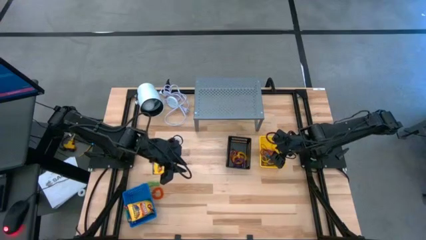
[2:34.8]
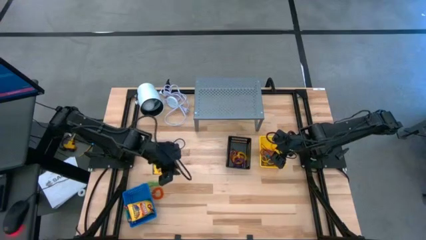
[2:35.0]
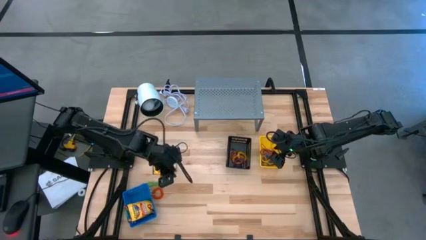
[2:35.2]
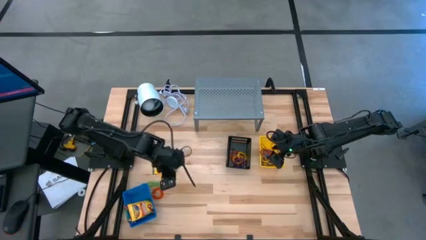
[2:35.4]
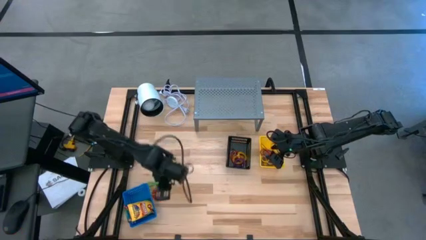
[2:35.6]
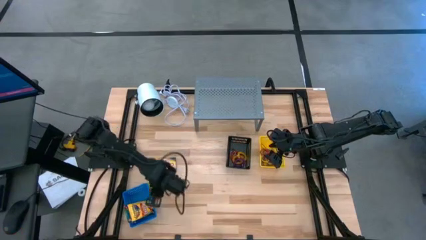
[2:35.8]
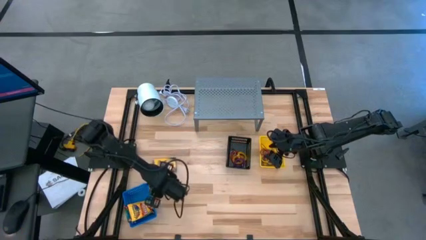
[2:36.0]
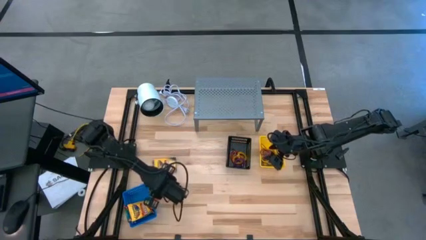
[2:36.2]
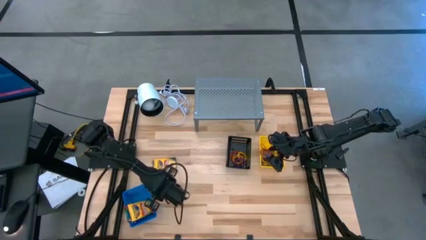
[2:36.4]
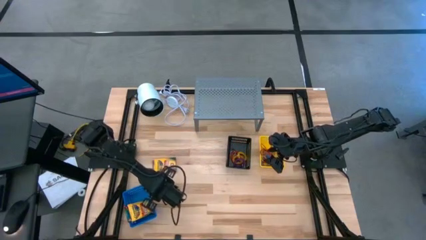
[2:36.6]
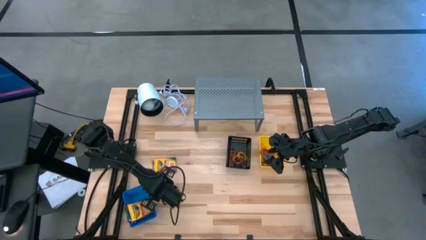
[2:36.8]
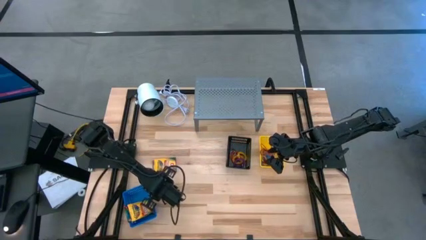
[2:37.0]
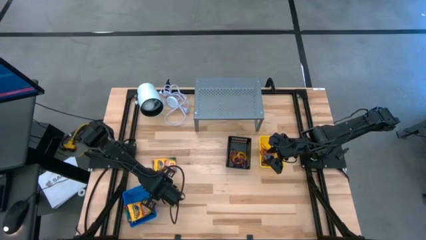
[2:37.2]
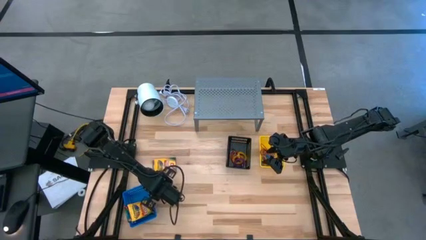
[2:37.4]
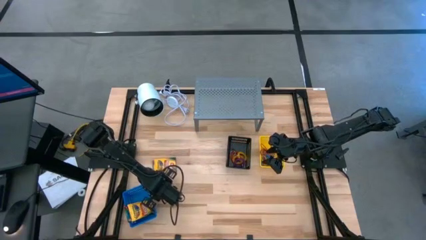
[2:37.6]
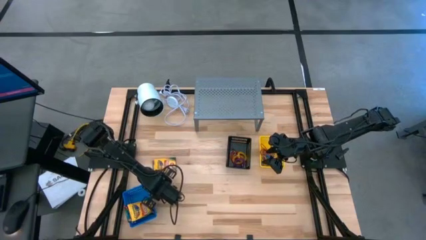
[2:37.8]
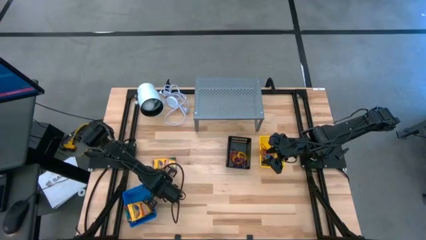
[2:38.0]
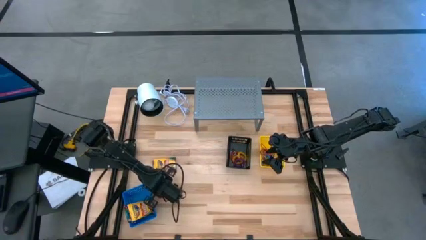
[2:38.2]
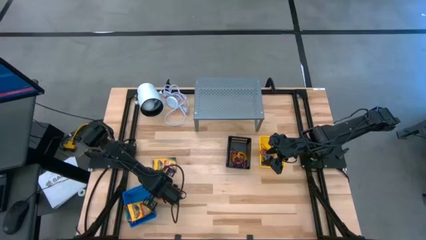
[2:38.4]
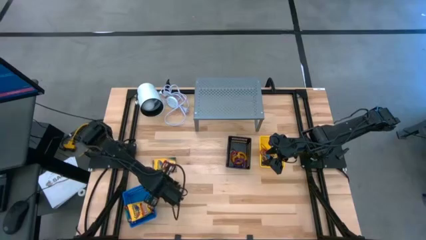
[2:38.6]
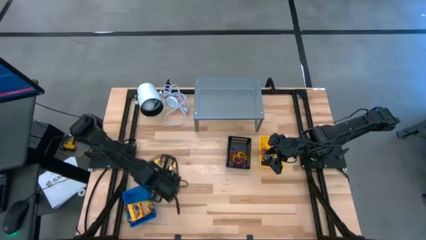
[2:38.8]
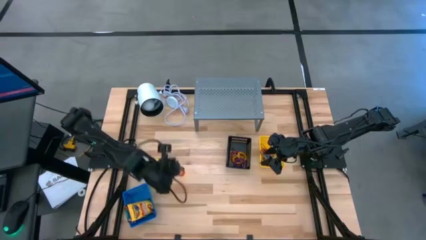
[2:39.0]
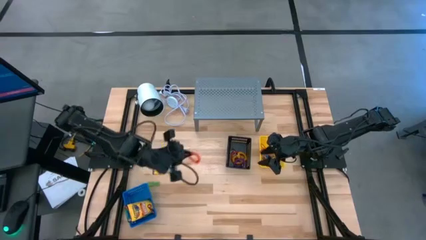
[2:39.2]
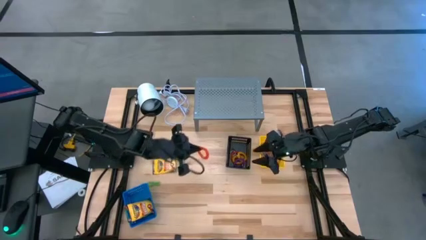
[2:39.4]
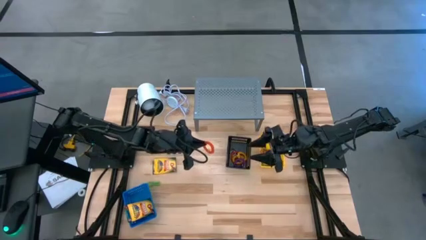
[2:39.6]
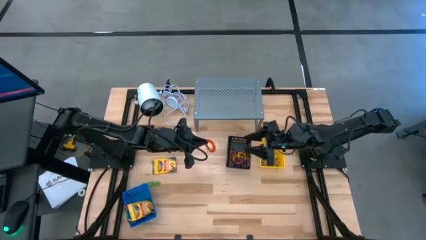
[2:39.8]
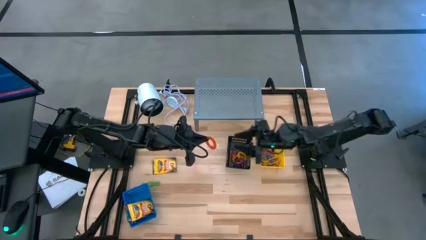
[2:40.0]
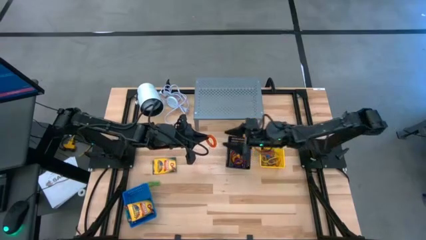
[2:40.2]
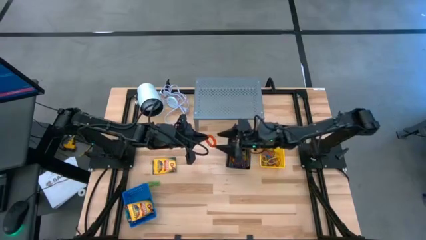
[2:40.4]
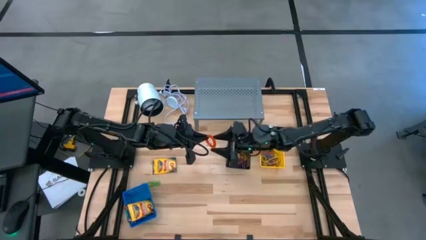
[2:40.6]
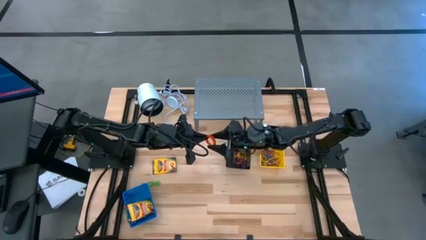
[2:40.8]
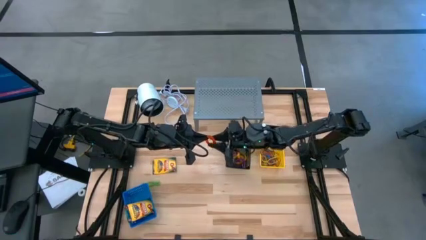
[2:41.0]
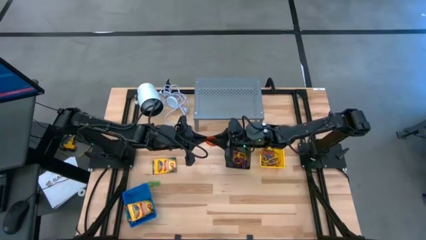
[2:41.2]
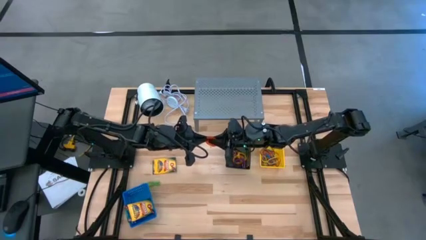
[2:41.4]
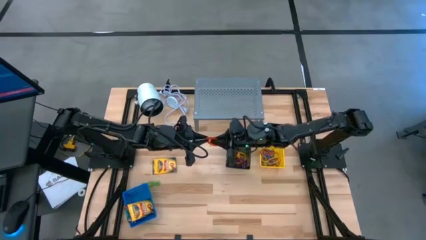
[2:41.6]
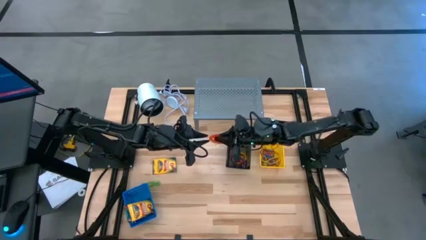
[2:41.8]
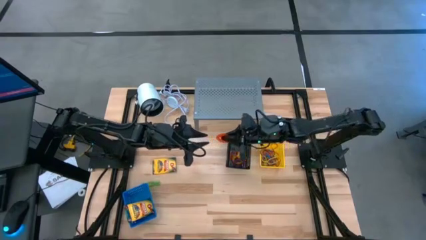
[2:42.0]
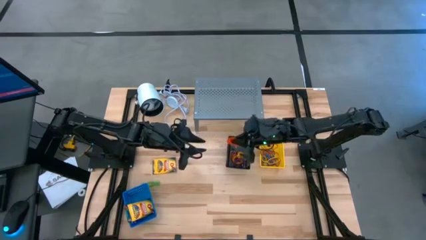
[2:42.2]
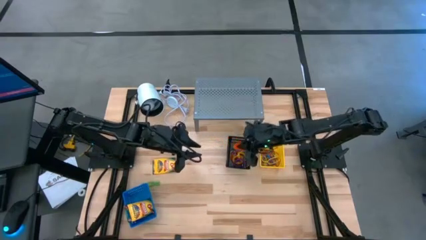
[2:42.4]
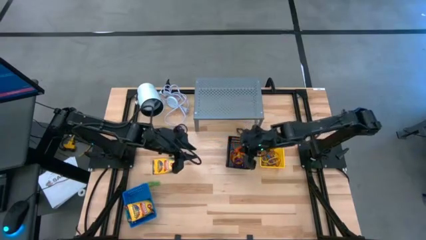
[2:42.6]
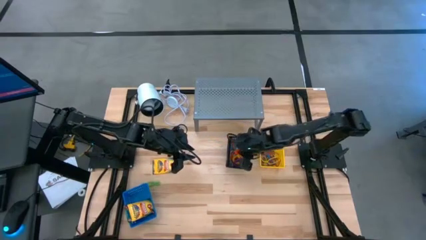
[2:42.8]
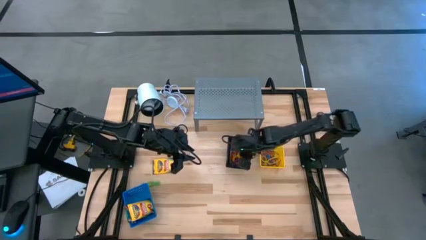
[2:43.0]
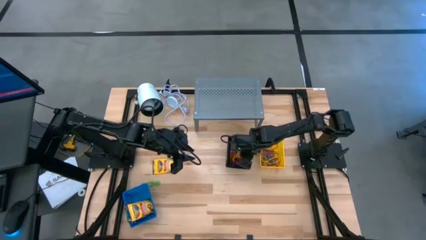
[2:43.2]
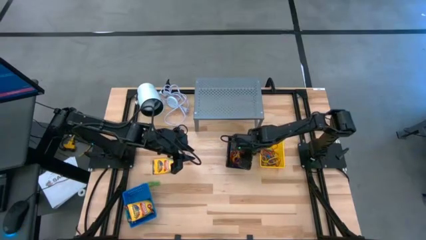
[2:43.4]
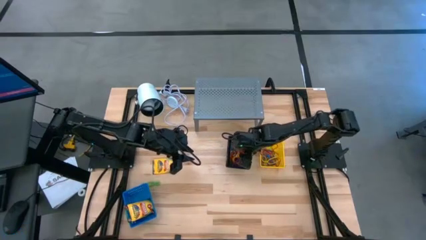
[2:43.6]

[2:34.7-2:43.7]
Task: Pick & Place Office Desk Supplies
Put the orange spring keychain into the black basket

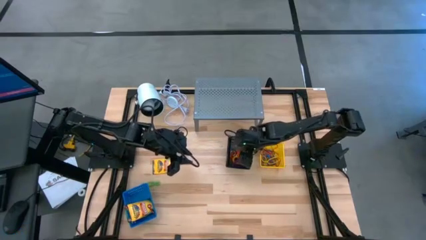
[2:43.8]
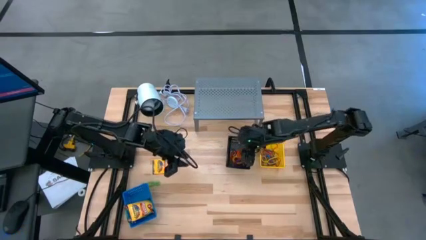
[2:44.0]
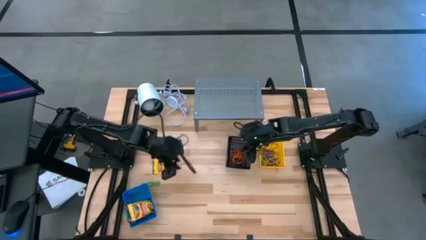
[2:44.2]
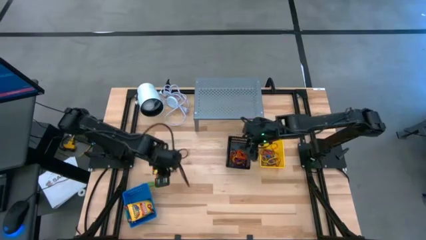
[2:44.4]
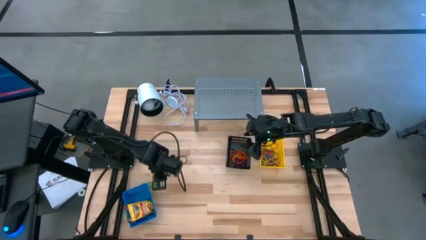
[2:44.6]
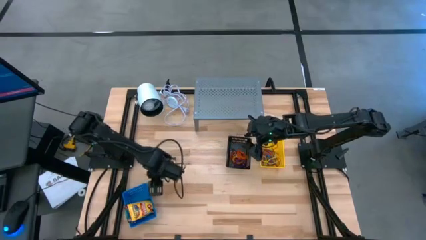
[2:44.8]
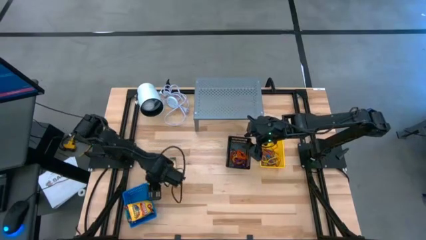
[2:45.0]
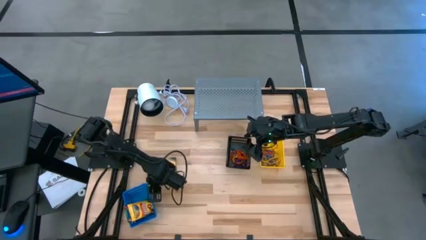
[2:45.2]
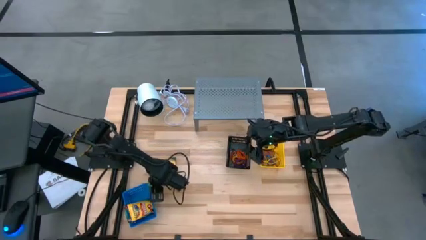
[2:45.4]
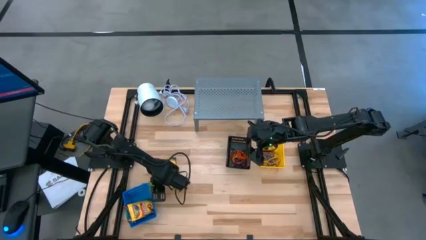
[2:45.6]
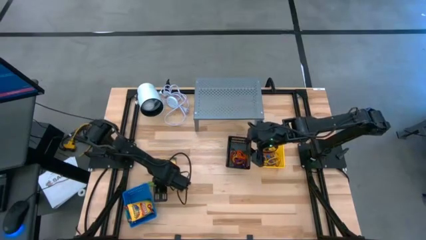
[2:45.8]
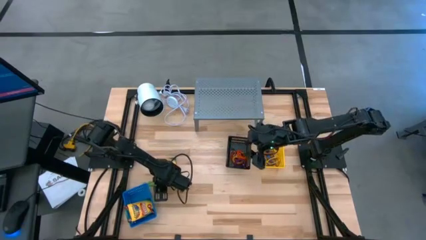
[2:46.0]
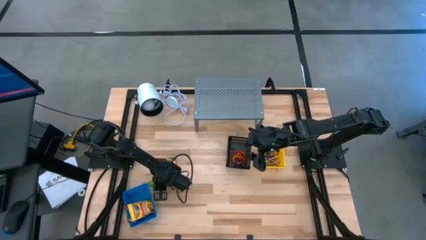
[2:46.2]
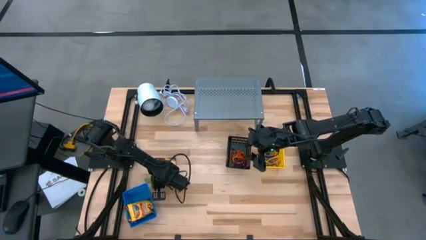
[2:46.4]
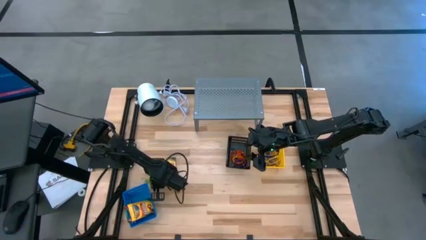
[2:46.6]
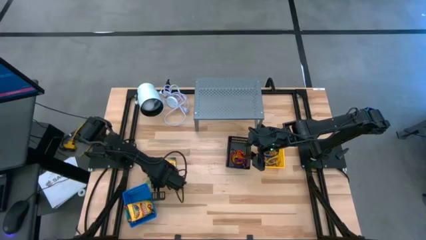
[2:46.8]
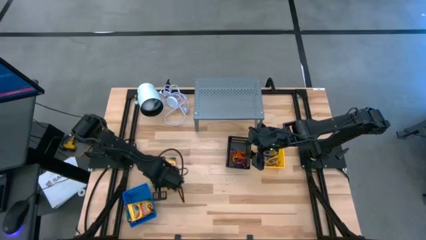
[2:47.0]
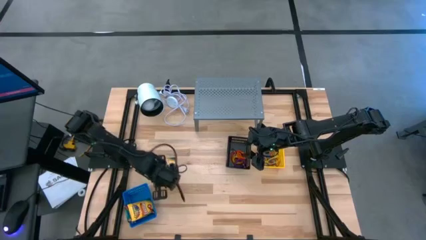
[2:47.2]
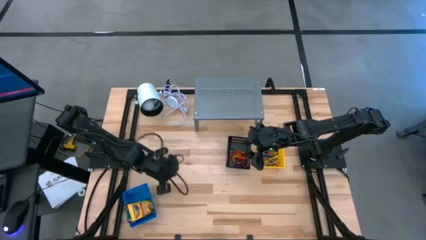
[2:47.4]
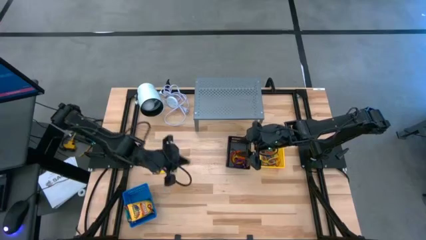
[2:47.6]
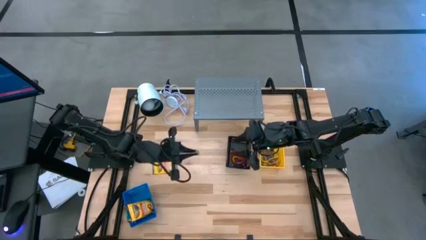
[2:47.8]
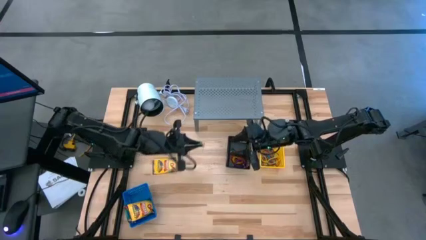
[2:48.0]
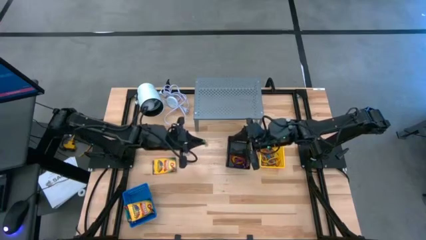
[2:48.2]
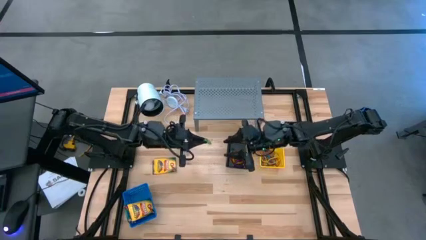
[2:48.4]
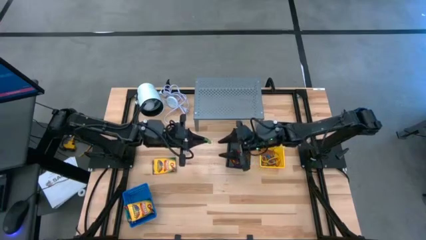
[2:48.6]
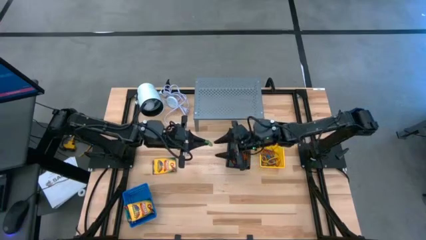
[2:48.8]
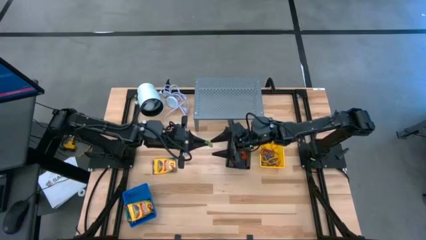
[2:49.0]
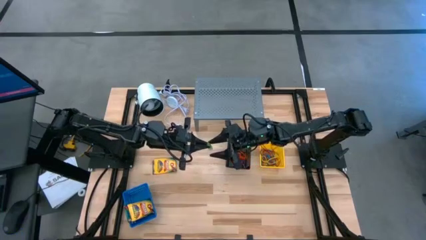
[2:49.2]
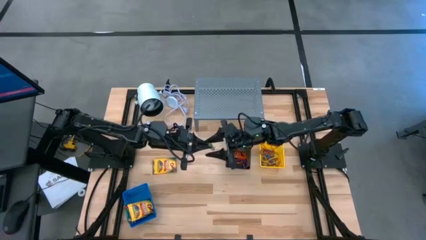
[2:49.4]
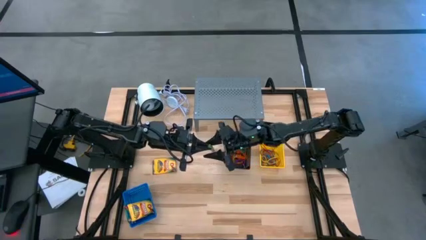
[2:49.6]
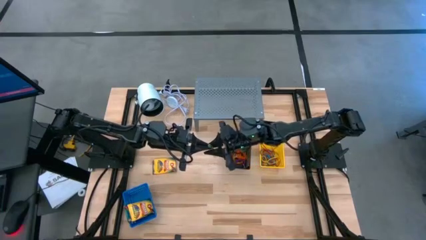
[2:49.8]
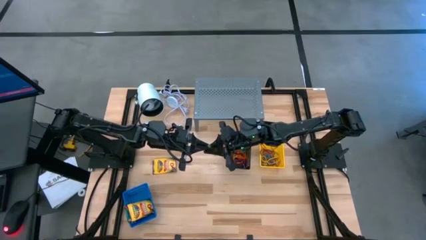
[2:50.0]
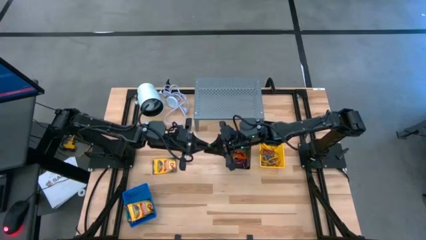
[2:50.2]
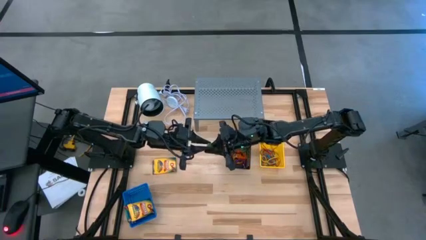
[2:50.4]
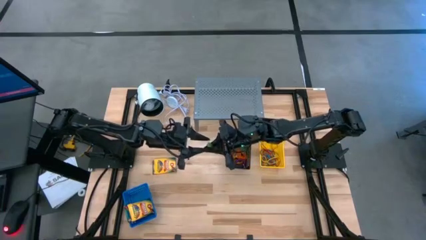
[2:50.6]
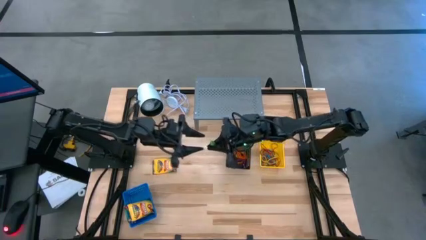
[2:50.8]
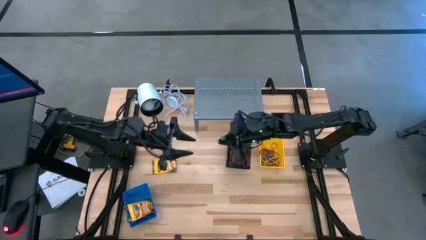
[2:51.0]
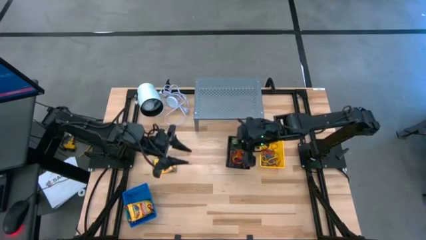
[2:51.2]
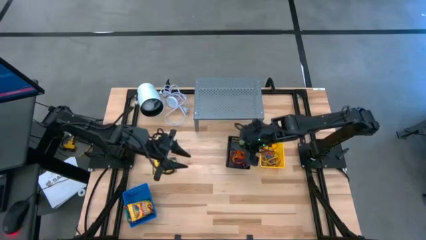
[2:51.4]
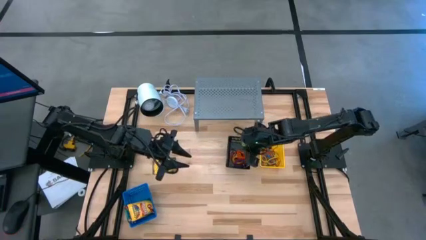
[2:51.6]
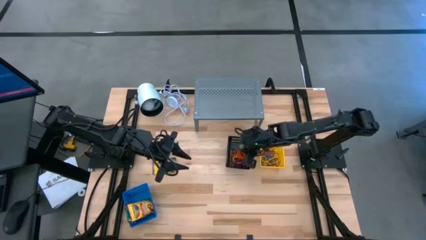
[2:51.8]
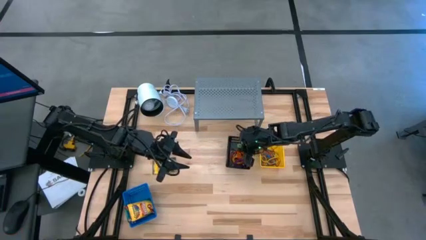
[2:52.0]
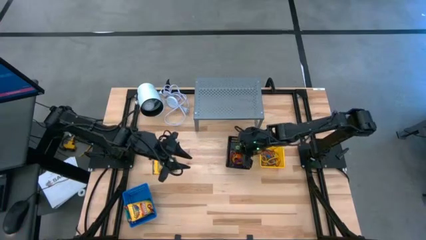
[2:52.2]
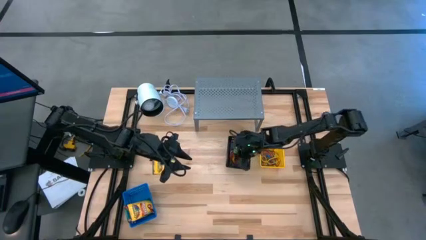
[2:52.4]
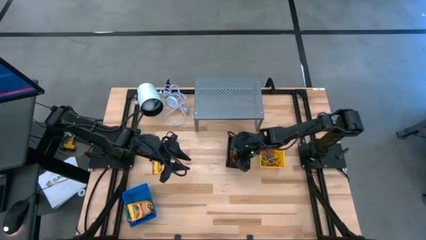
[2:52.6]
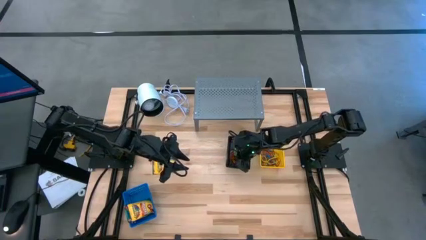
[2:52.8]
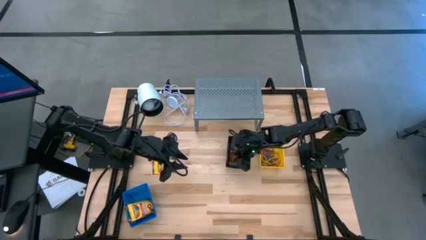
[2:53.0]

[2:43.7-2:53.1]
Put the green spring keychain into the black basket
